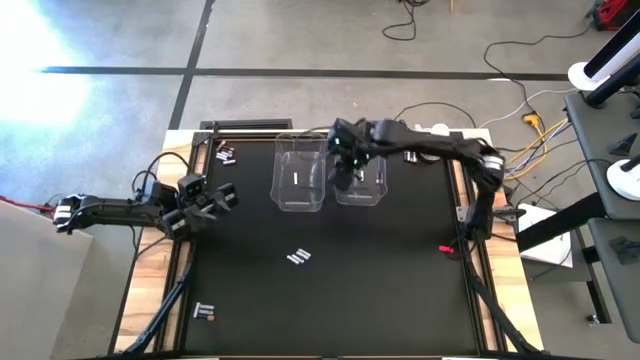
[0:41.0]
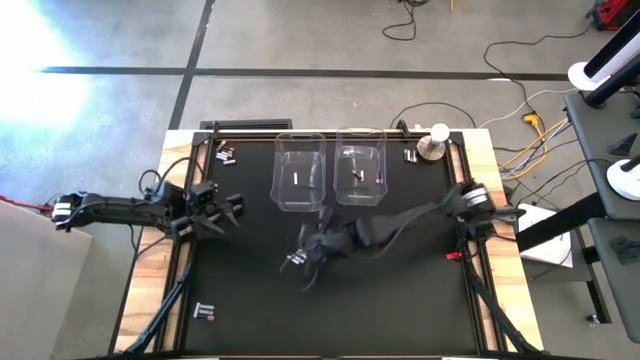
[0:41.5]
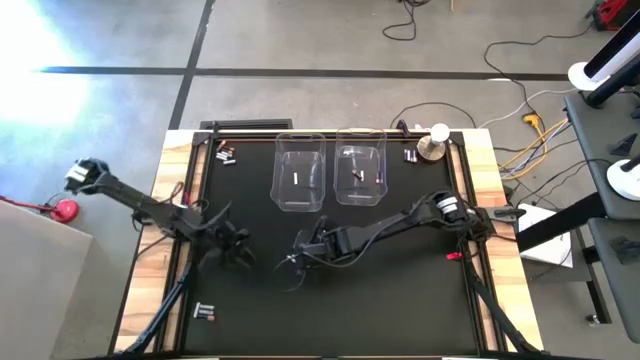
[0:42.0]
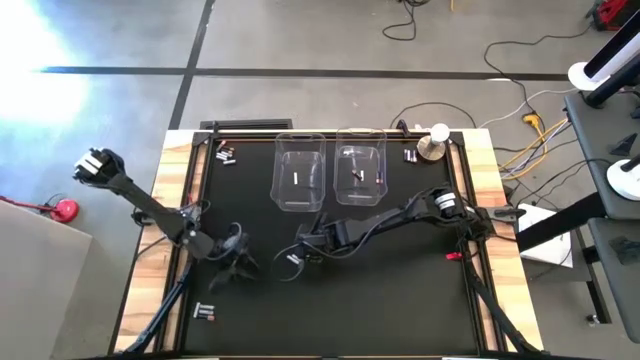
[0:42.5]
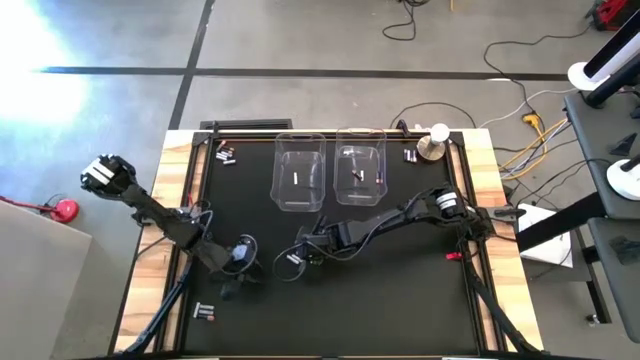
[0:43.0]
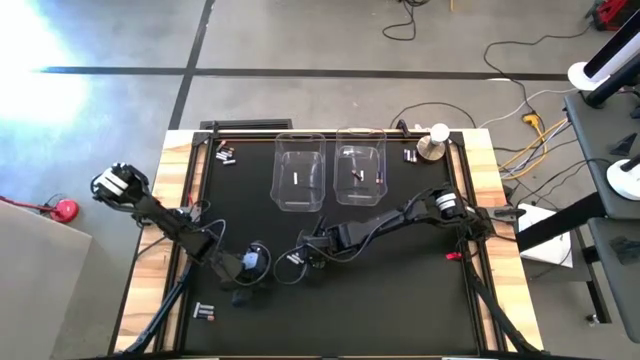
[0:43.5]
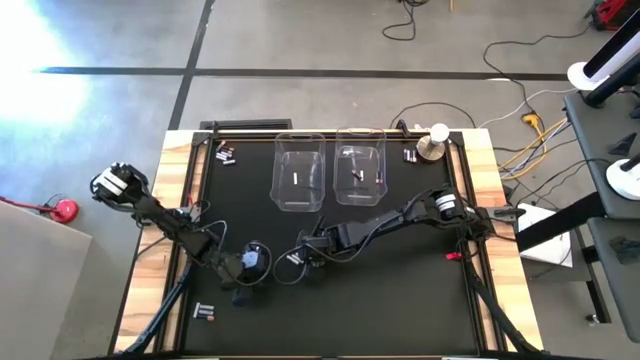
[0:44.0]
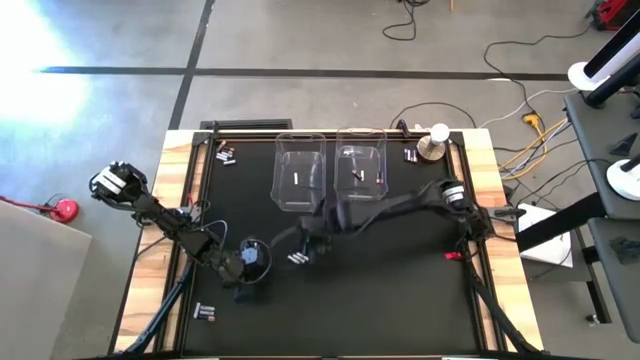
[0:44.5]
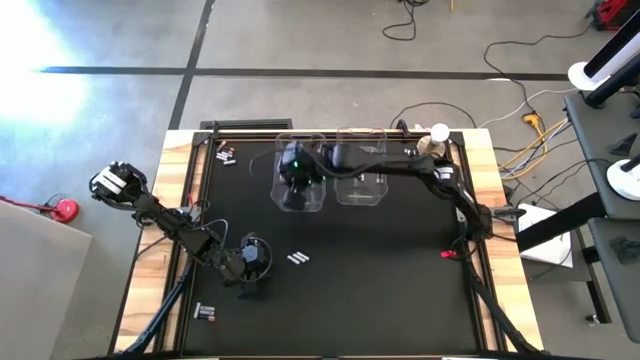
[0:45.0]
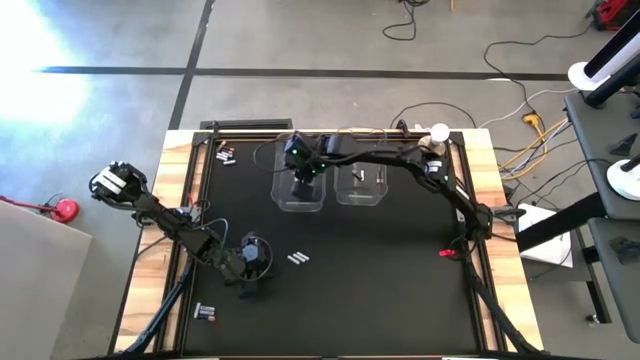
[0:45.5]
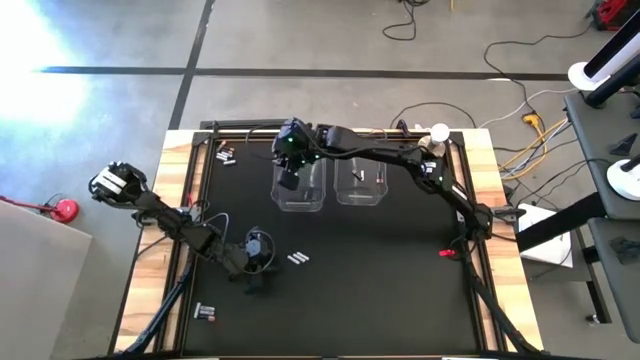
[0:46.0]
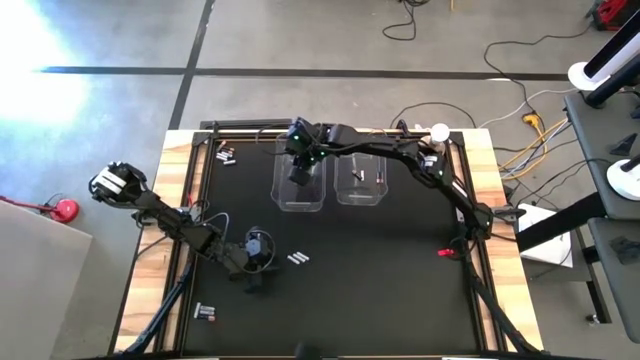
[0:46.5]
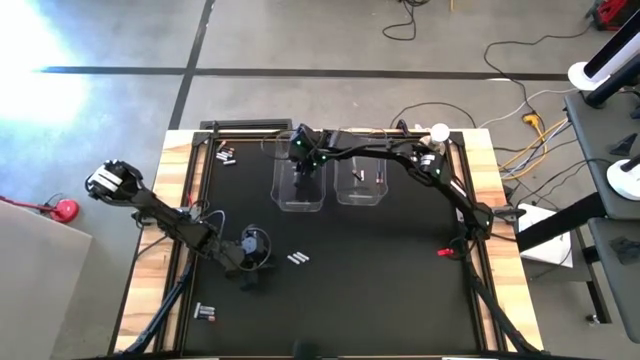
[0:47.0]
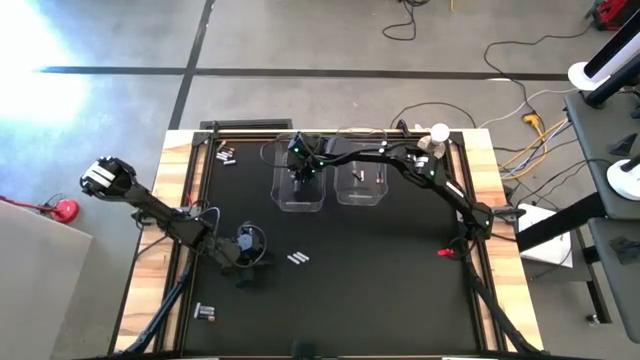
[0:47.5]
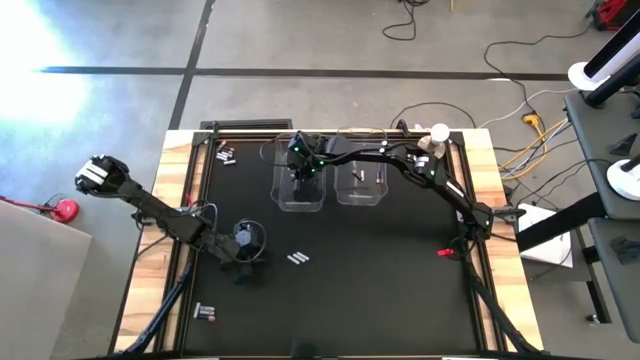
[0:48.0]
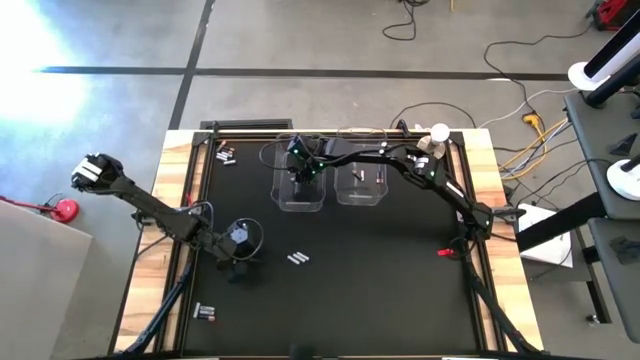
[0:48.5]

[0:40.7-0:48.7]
Task: Sort batteries
Put the white battery into the left transparent bin

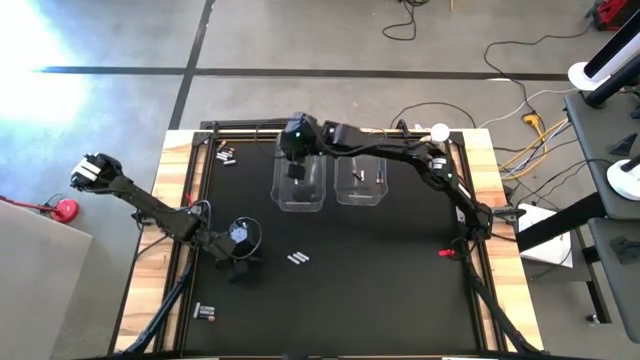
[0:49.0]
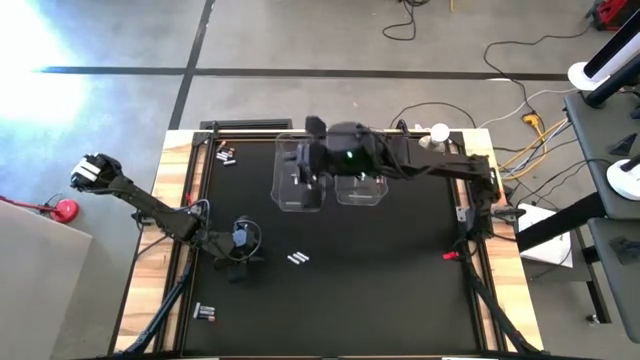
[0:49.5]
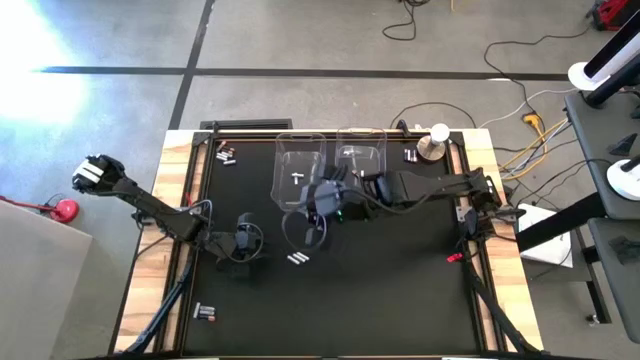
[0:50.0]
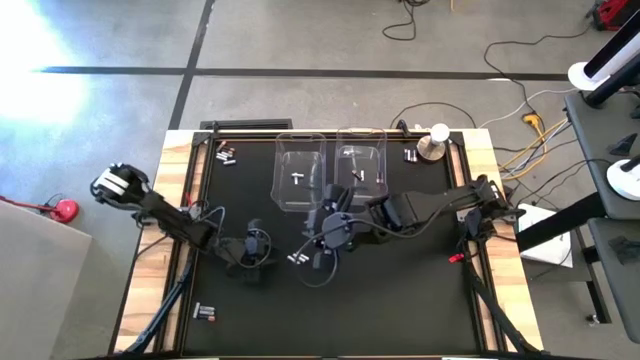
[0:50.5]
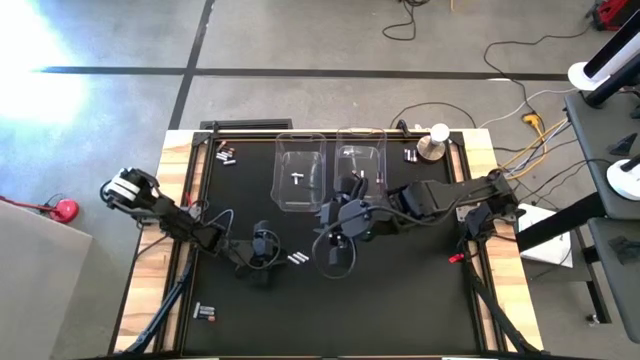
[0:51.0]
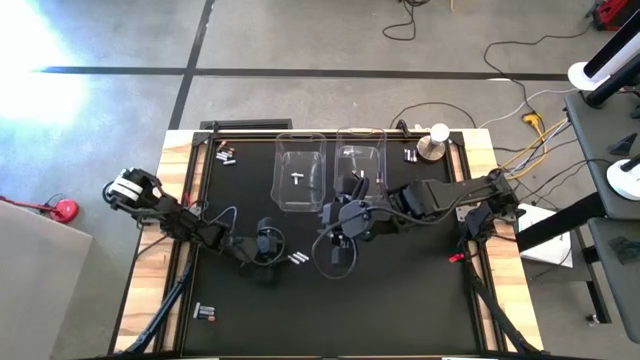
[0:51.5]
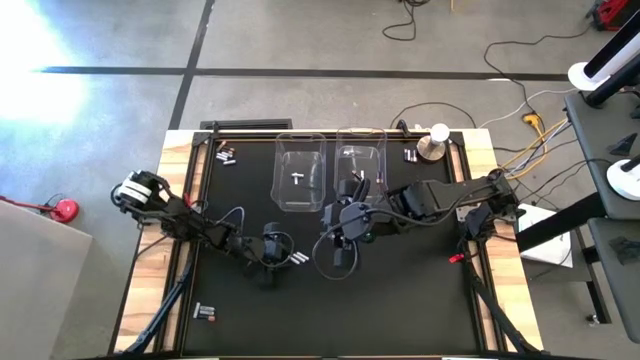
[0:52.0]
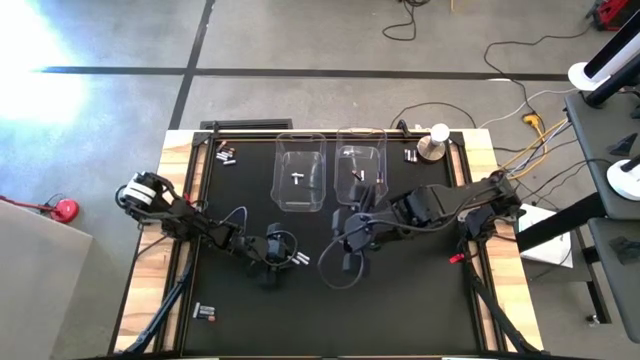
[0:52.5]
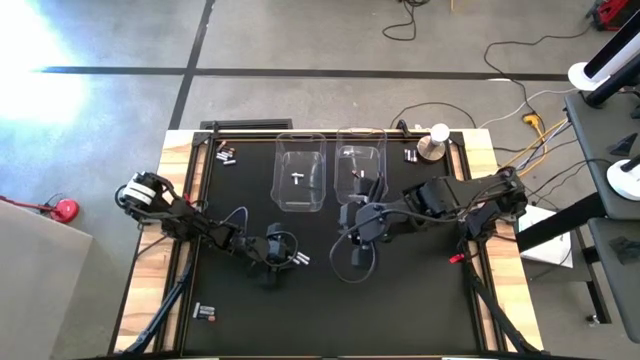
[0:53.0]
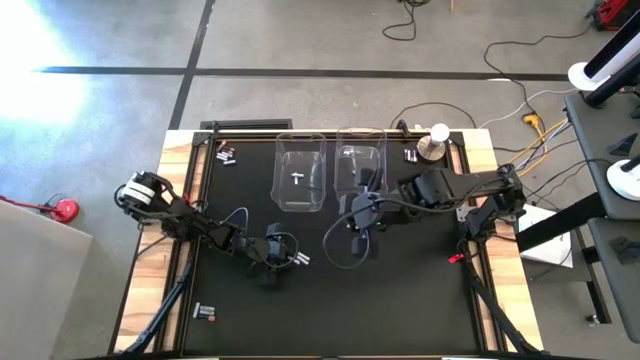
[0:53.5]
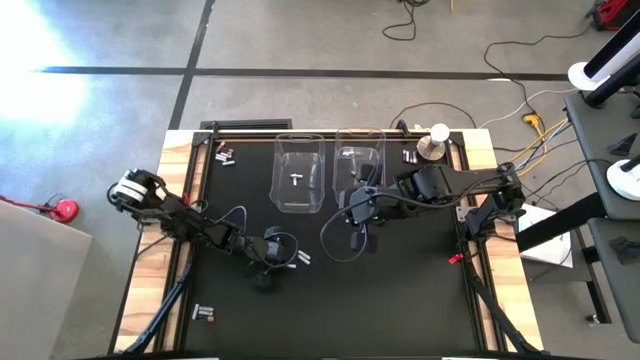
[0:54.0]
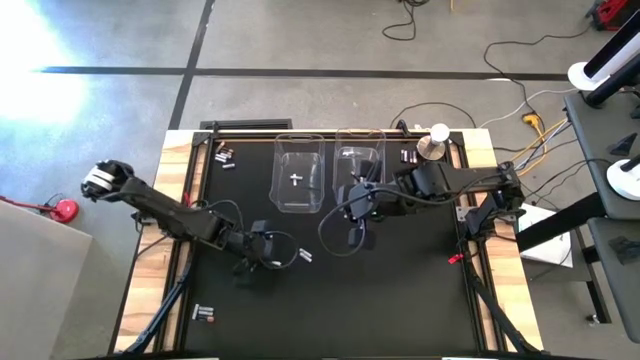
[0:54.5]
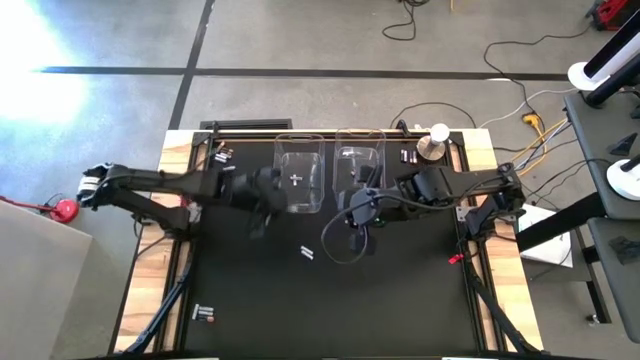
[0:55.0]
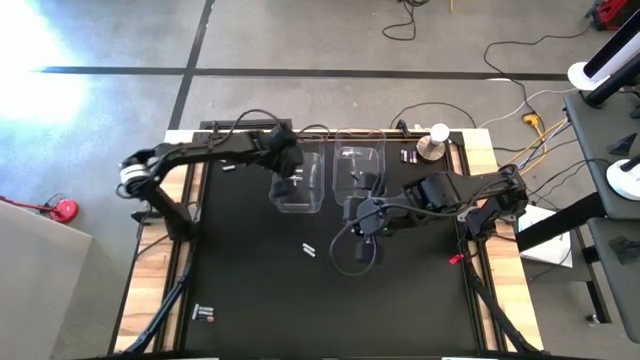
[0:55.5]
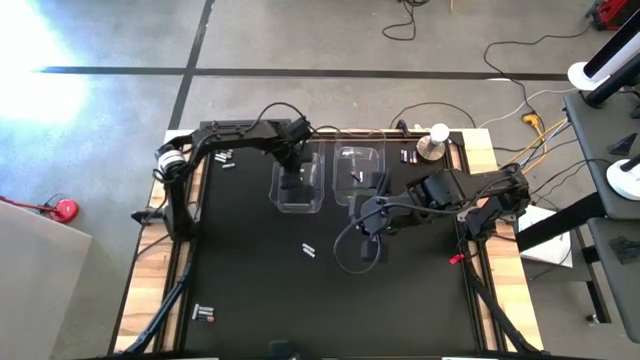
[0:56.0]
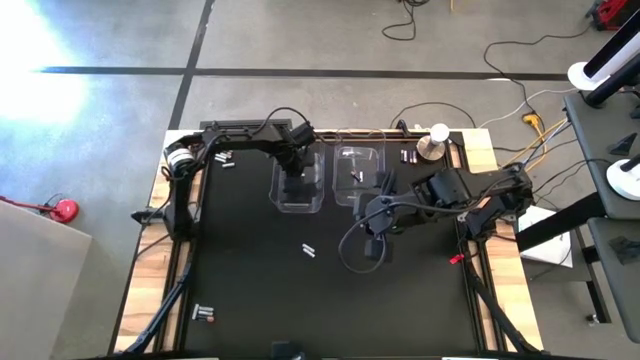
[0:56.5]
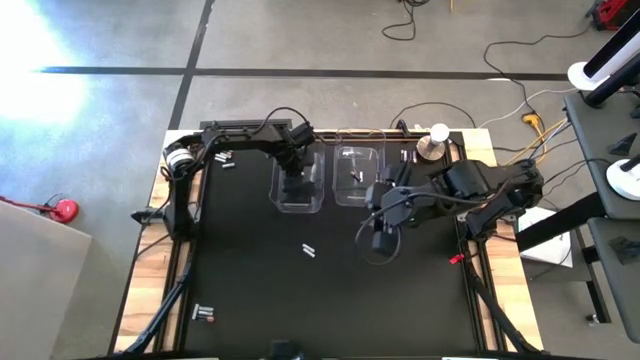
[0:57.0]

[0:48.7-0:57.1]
Put the white battery into the left transparent bin

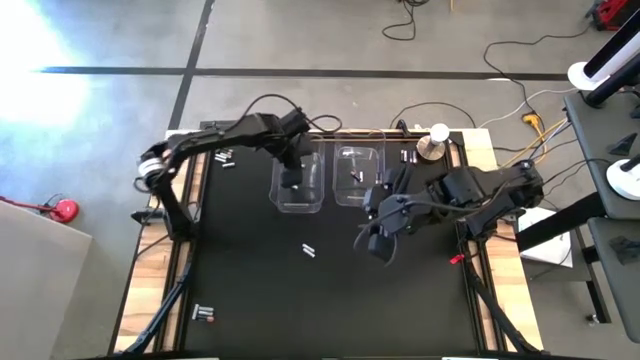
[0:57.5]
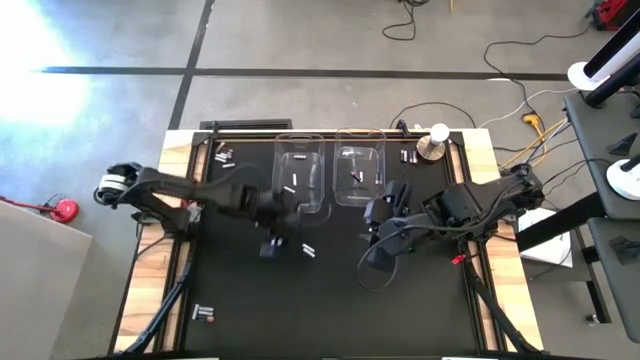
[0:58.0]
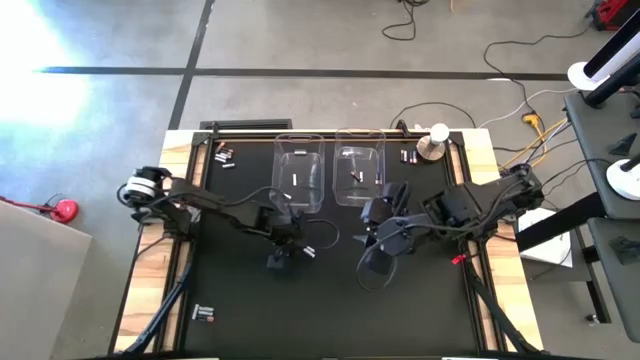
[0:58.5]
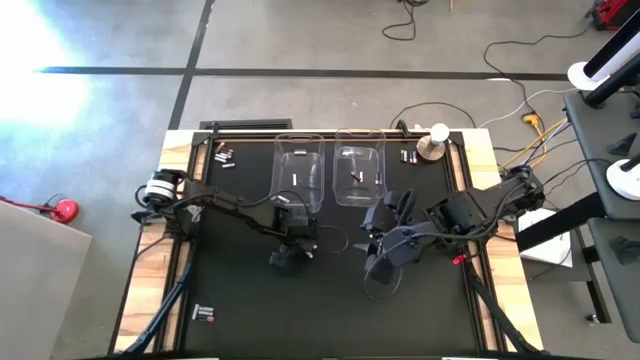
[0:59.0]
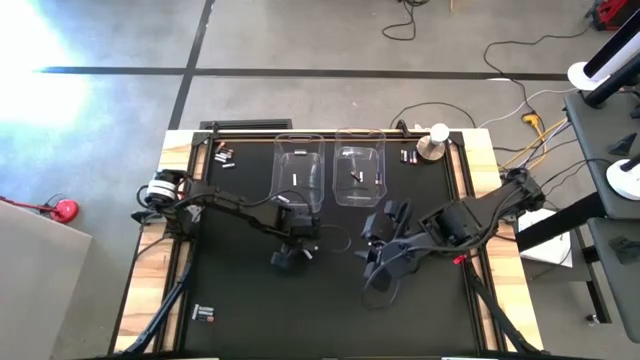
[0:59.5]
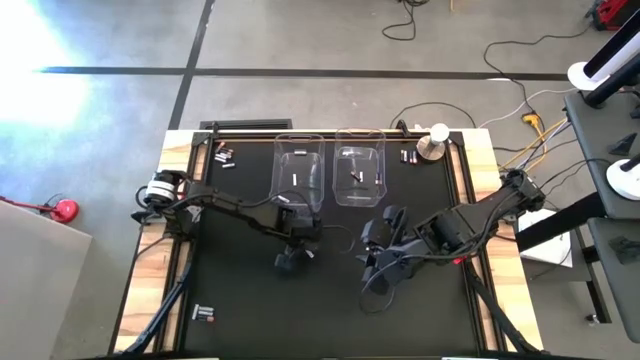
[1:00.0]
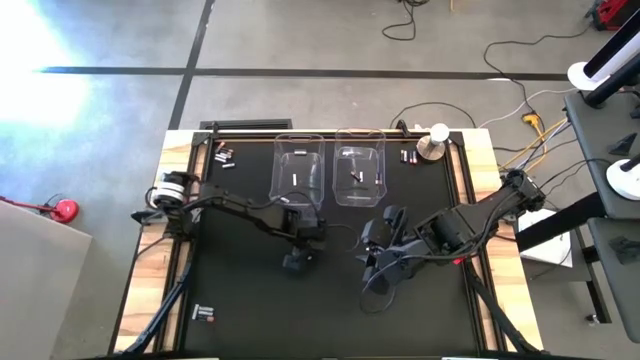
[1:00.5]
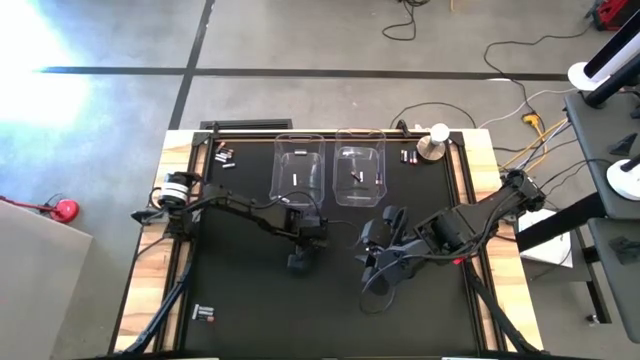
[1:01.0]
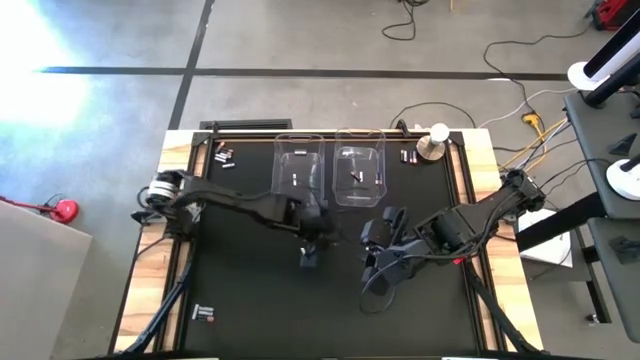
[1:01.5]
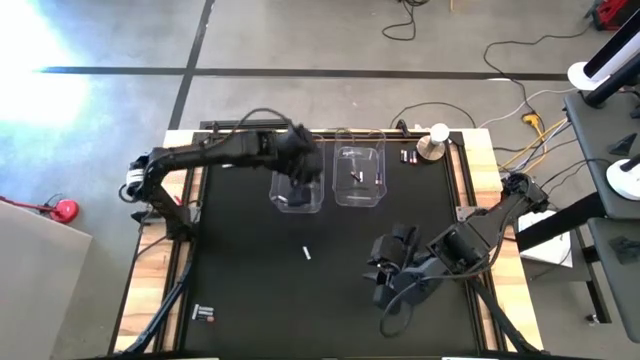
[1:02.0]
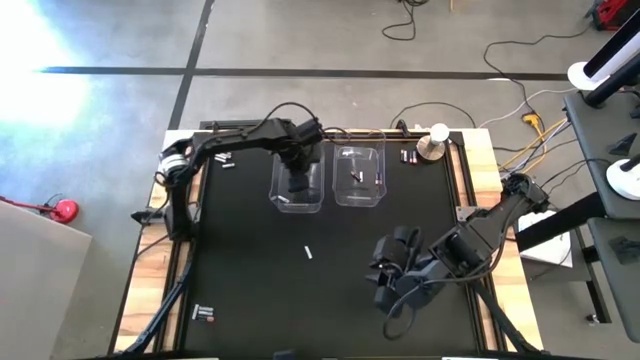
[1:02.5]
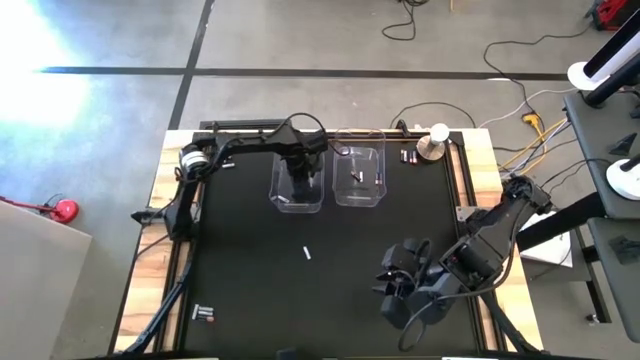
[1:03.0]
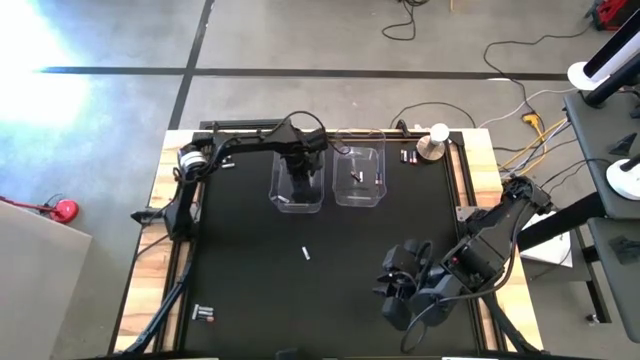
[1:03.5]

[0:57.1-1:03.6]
Put the white battery into the left transparent bin
